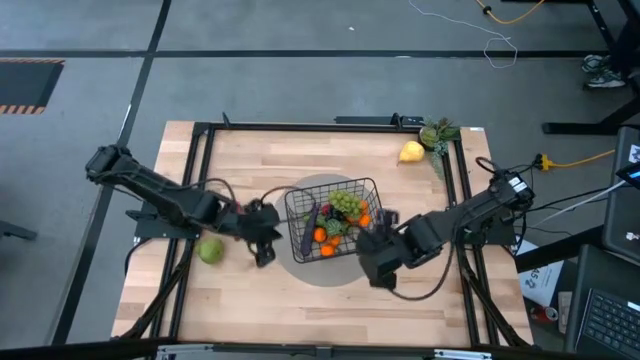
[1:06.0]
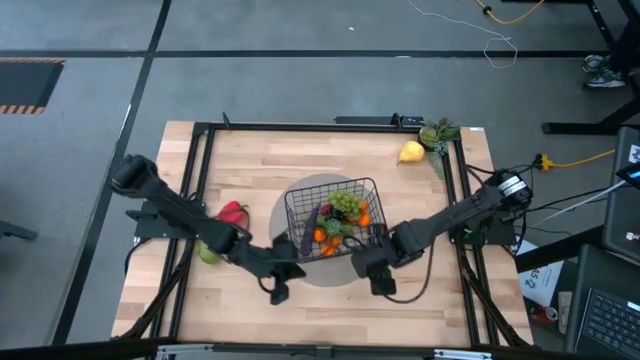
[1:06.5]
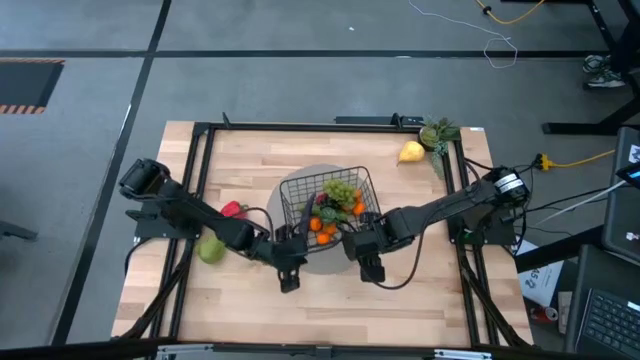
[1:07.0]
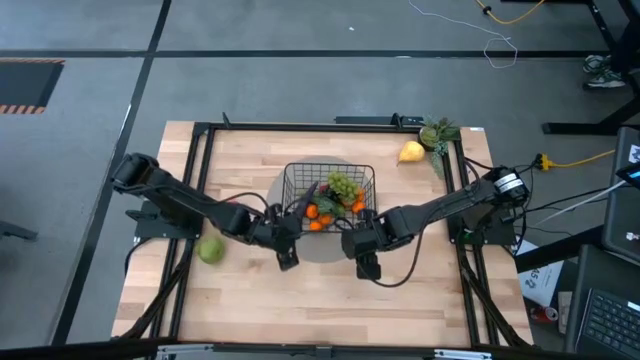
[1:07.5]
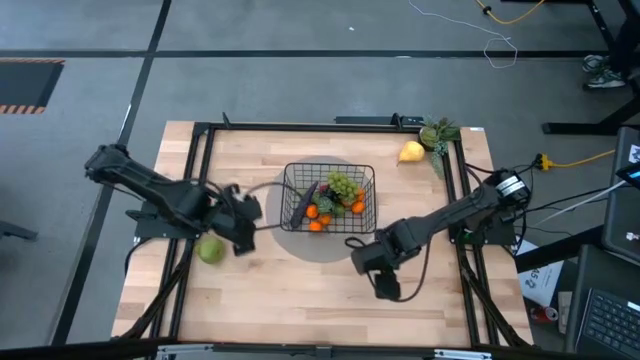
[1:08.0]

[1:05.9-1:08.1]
Task: Build produce basket
Adjust the wire basket

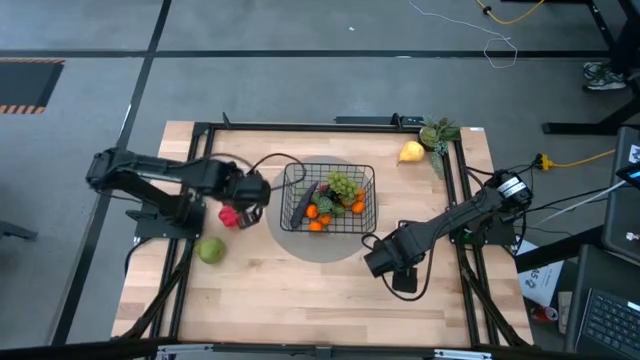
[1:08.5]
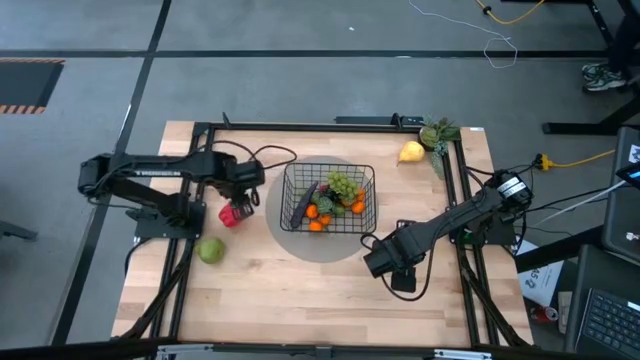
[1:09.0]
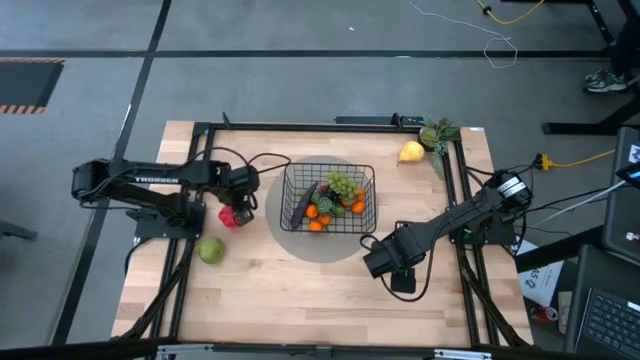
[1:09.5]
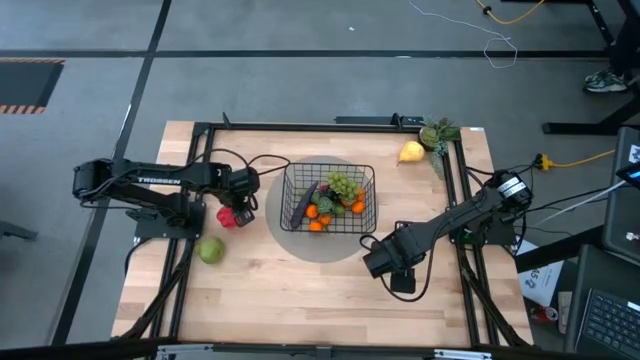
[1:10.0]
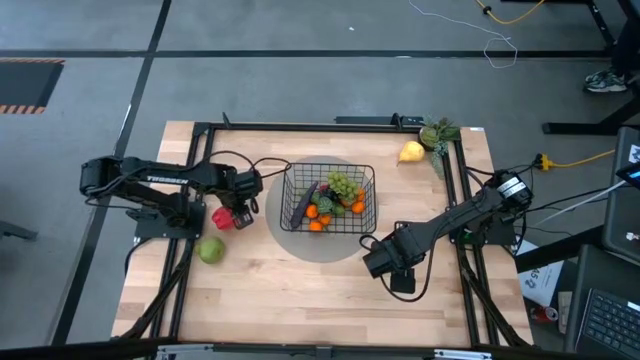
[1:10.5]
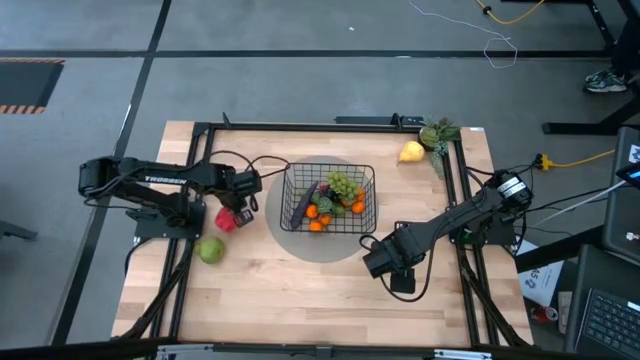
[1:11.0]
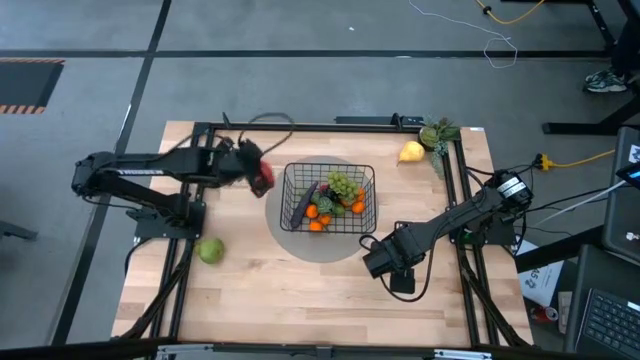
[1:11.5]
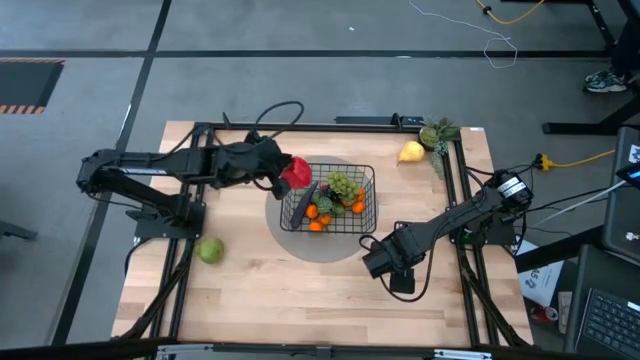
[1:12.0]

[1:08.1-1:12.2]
Put the red bell pepper into the wire basket

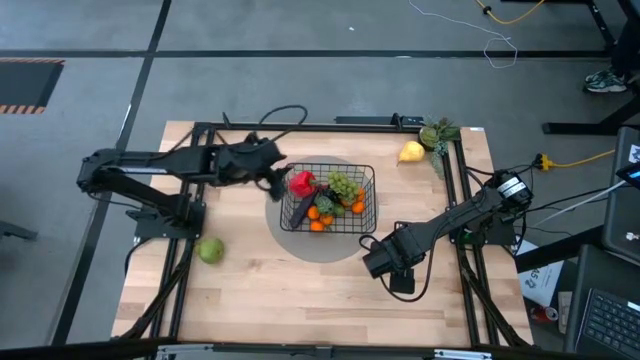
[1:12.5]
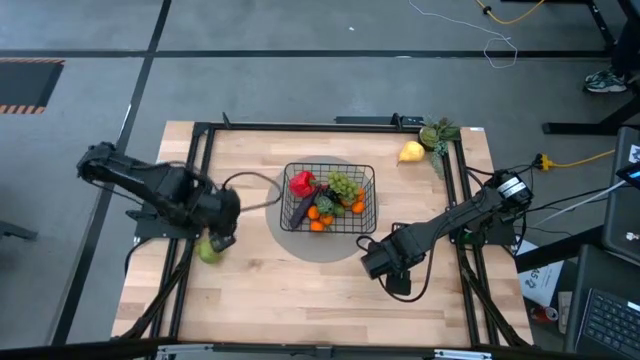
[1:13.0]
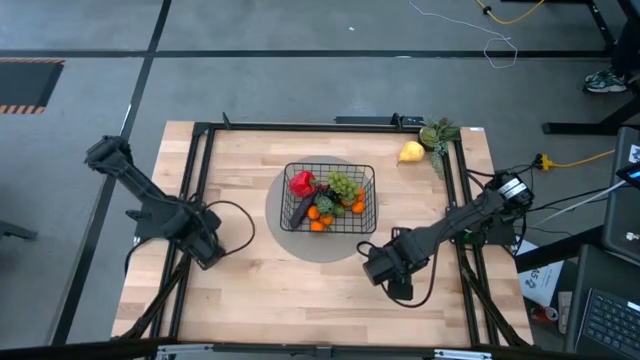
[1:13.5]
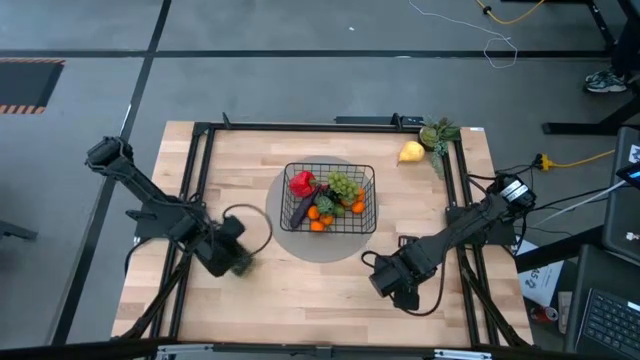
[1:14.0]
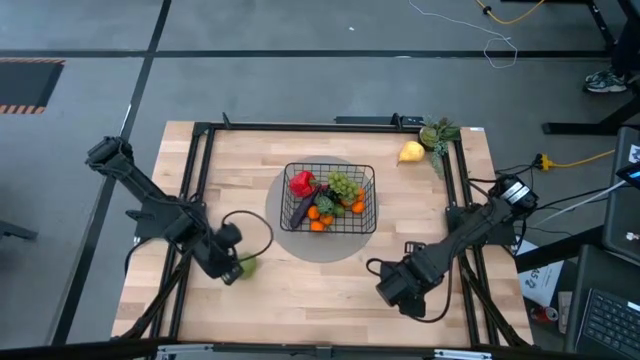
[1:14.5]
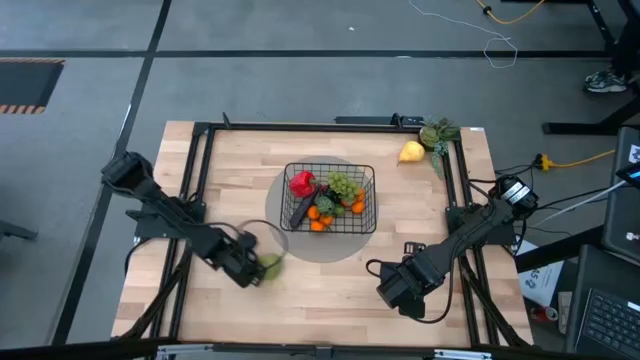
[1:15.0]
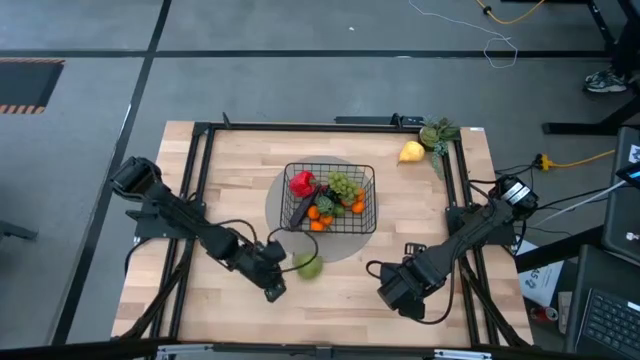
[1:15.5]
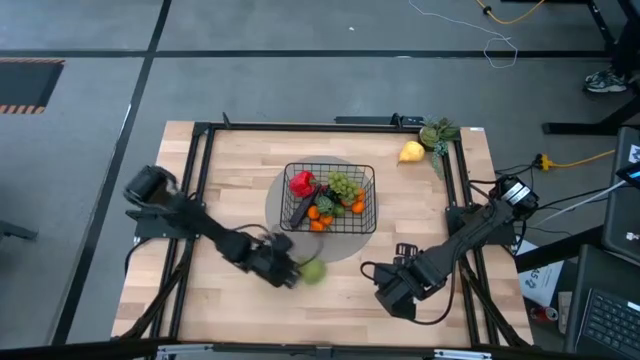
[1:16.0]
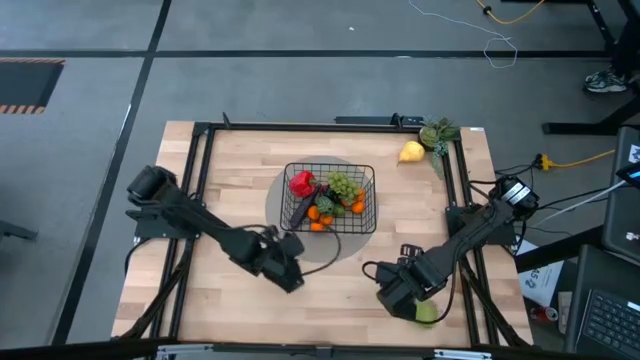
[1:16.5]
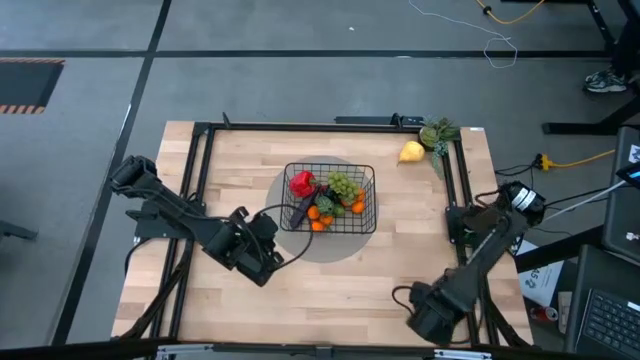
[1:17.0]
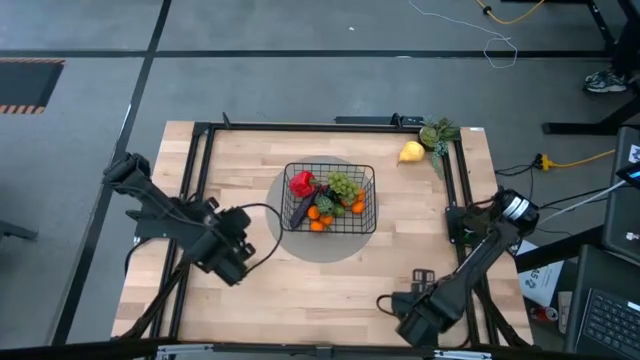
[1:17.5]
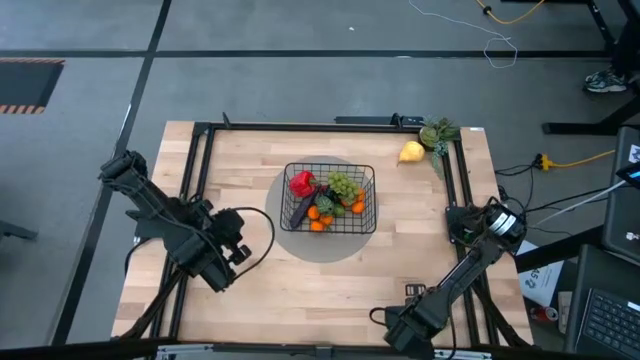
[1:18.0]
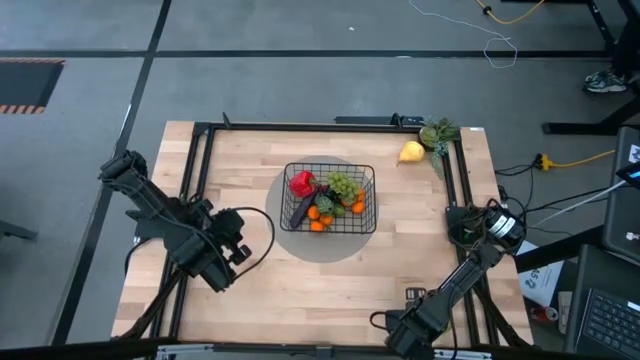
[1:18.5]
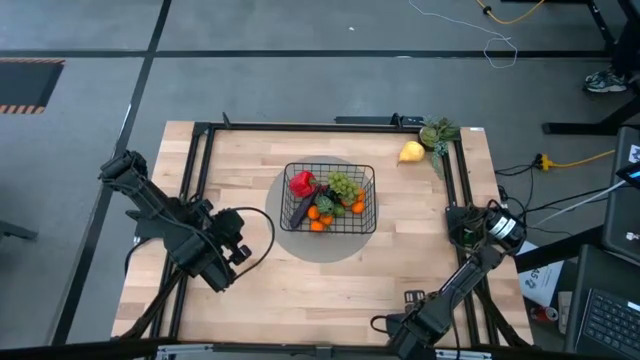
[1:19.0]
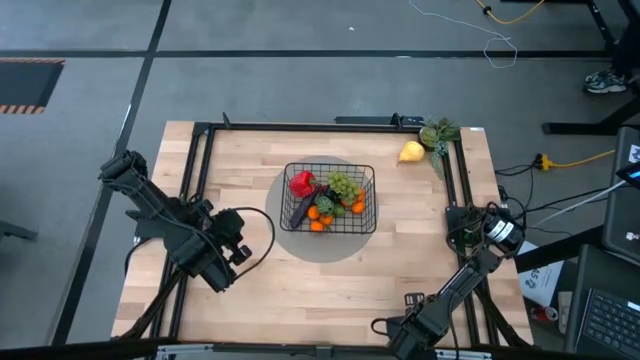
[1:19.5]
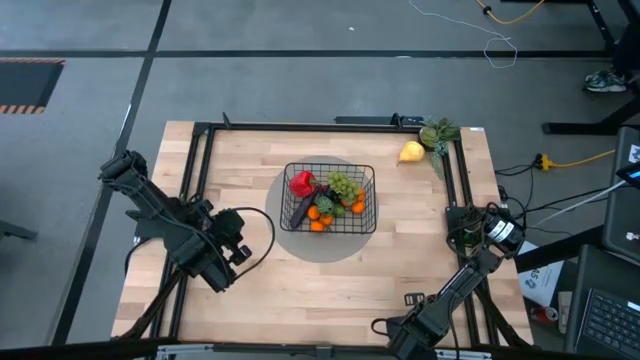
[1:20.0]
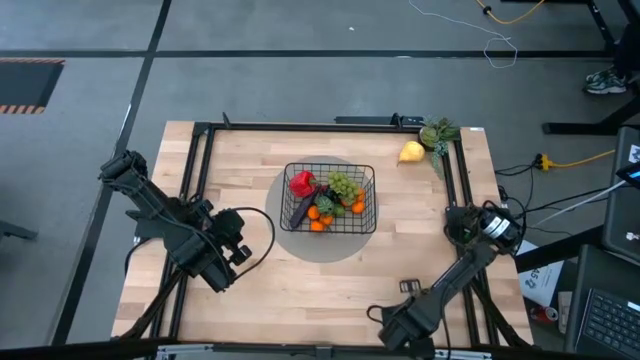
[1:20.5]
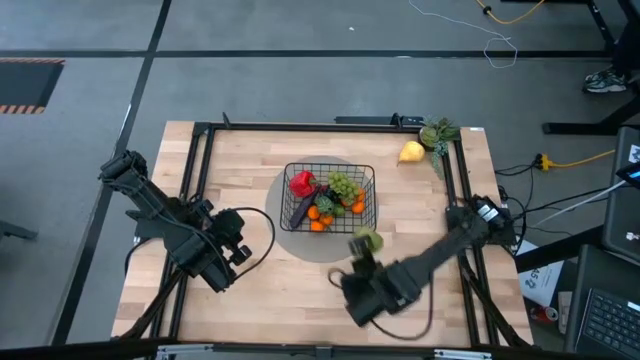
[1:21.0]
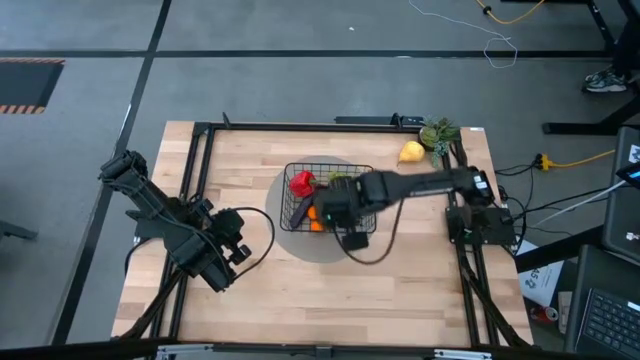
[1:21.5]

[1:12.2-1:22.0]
Put the green pear into the wire basket

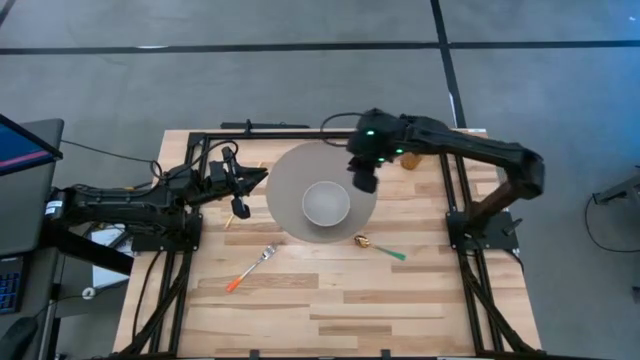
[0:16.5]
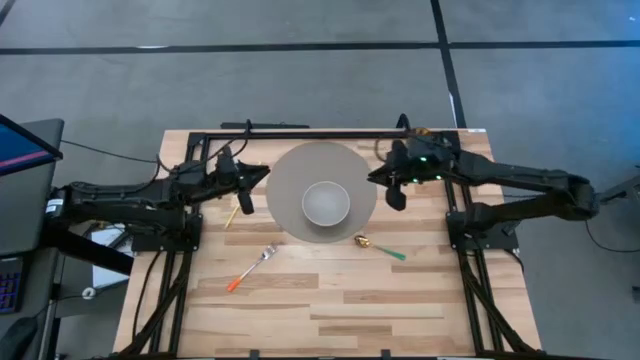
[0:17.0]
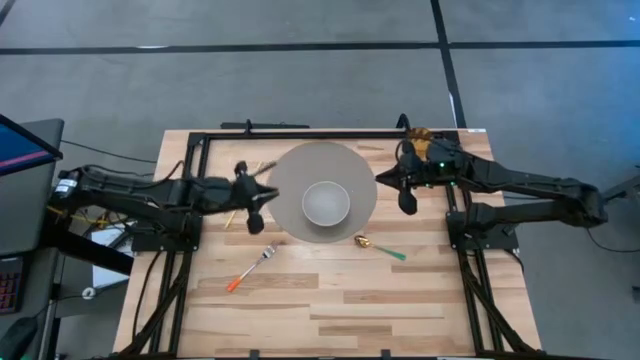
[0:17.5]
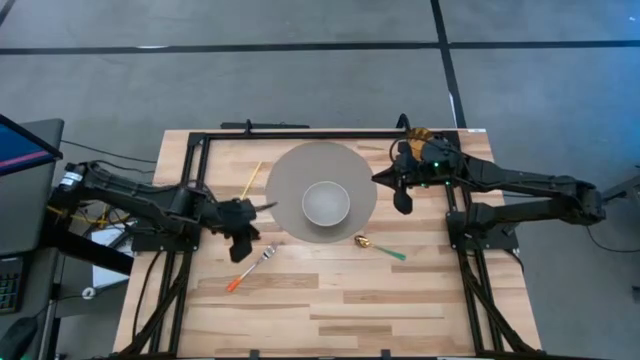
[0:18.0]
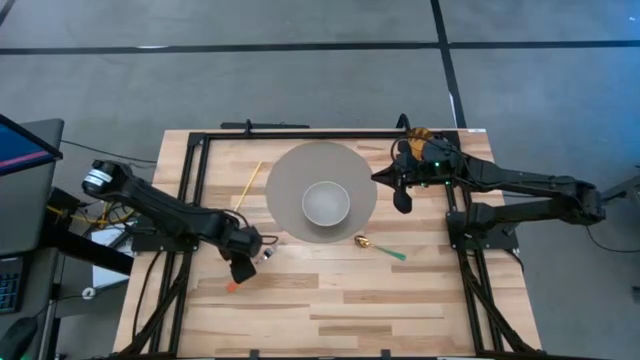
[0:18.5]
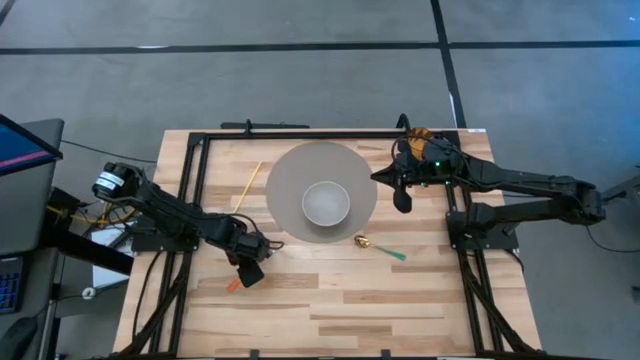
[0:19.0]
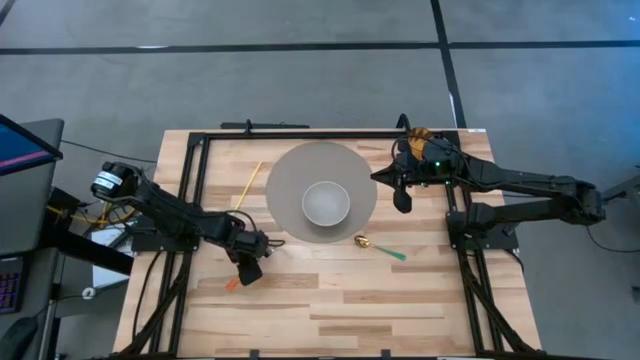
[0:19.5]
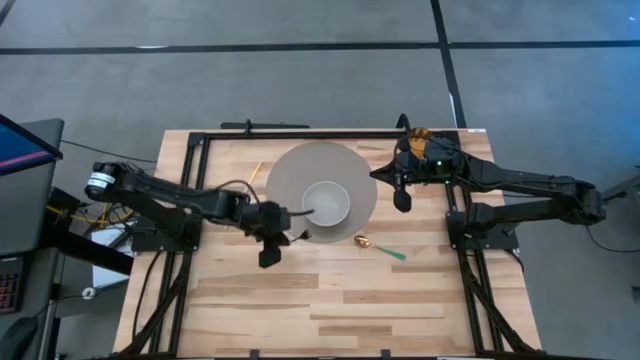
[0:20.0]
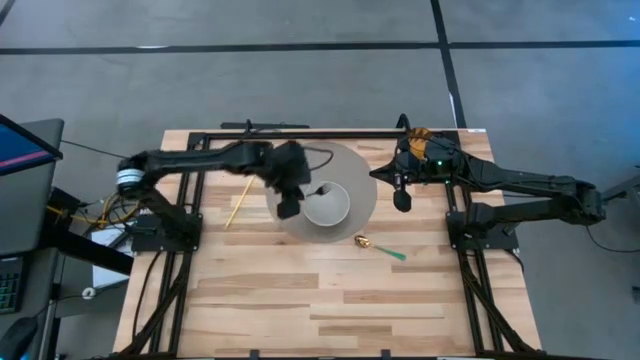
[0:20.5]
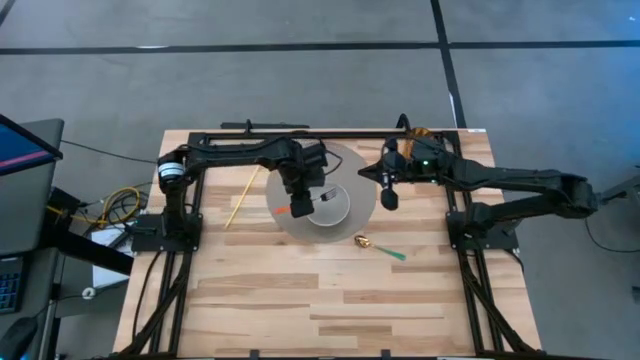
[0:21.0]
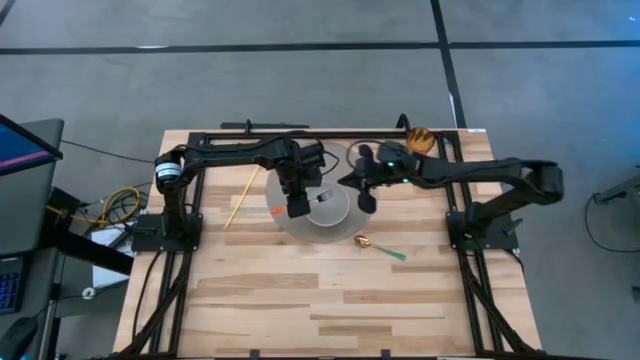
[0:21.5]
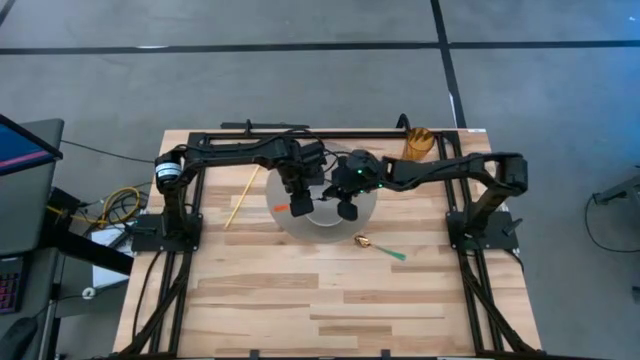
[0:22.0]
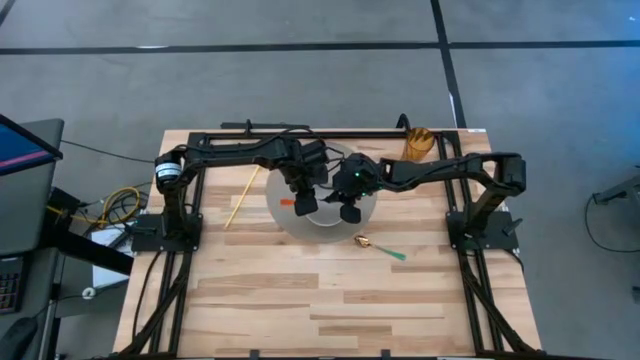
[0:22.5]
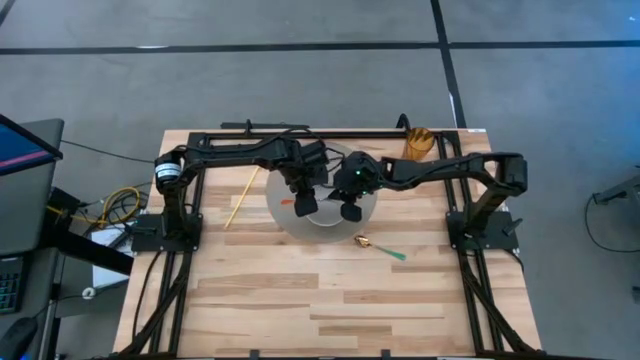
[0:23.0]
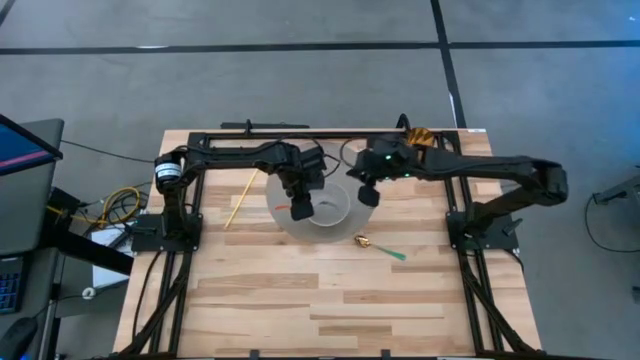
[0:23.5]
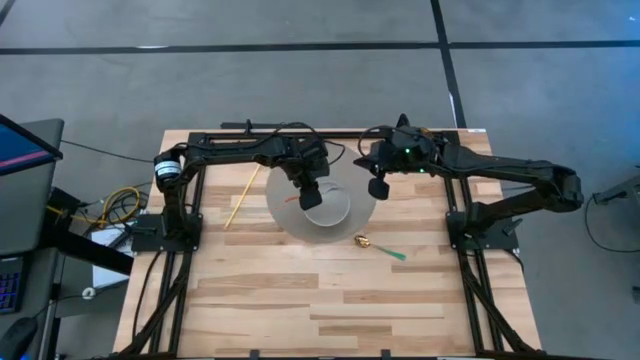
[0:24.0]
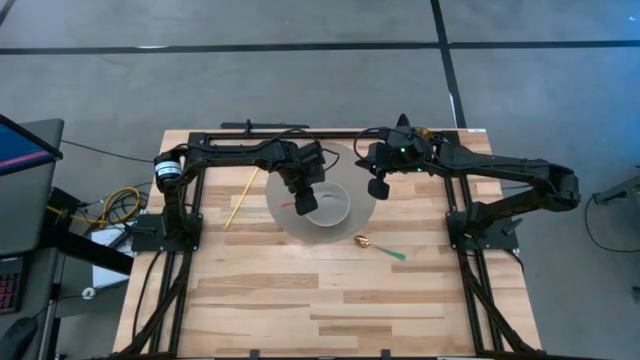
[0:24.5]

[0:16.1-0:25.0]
Task: Pick & Place Utensil
Put the orange fork into the white bowl
